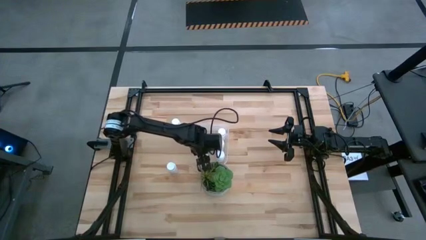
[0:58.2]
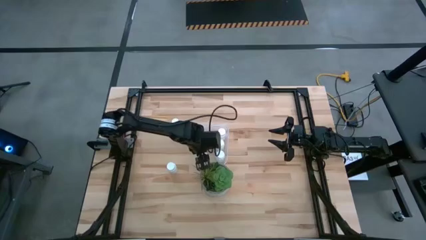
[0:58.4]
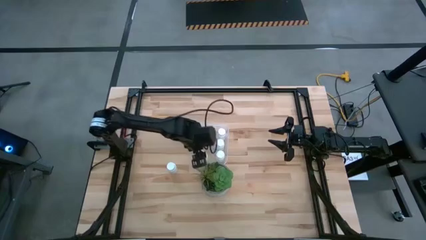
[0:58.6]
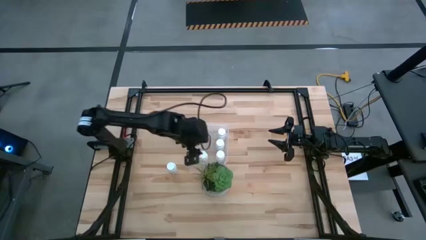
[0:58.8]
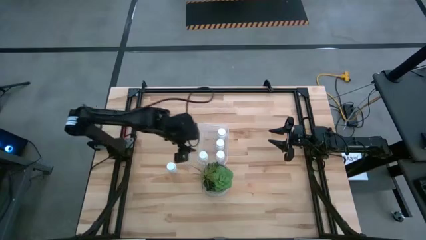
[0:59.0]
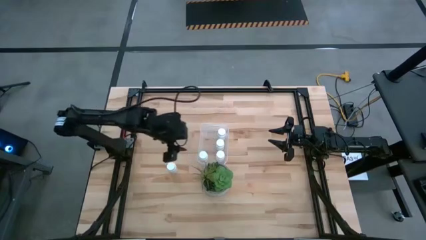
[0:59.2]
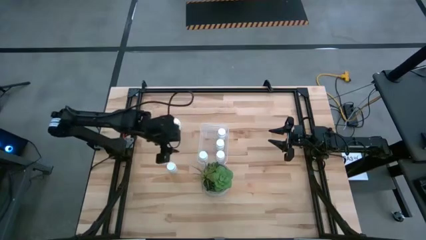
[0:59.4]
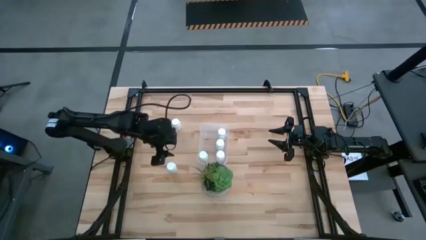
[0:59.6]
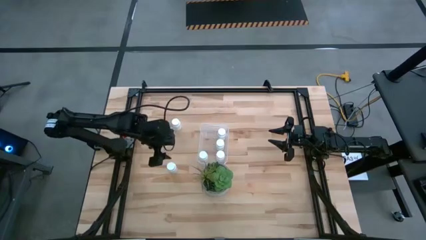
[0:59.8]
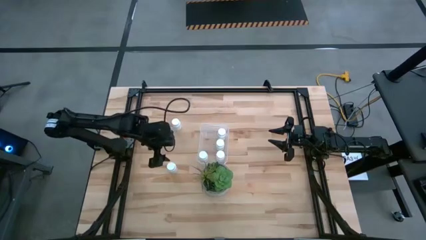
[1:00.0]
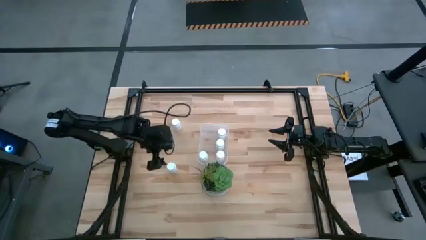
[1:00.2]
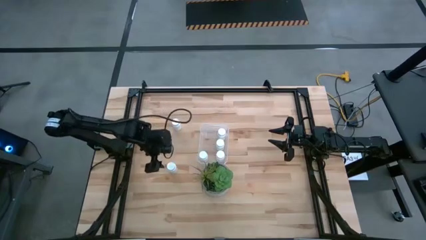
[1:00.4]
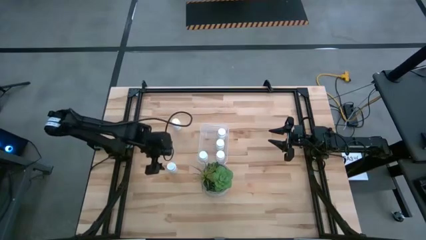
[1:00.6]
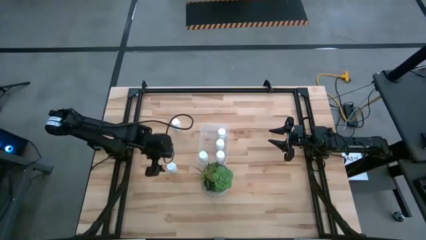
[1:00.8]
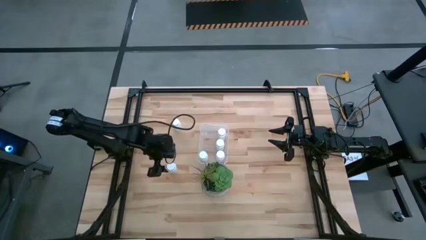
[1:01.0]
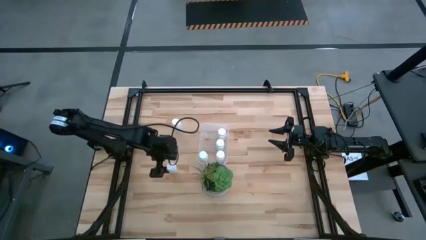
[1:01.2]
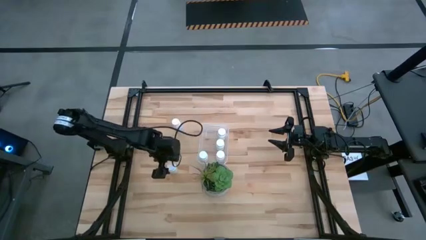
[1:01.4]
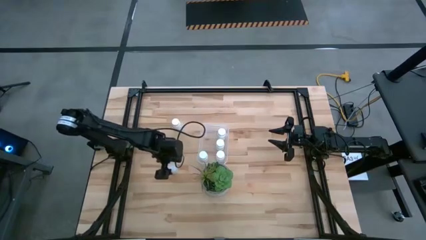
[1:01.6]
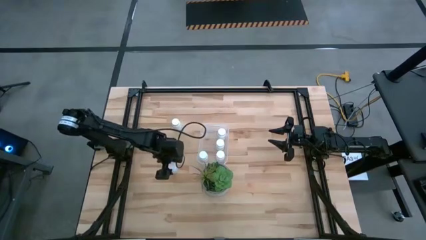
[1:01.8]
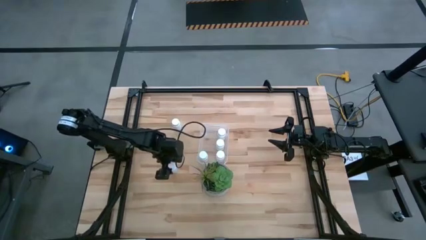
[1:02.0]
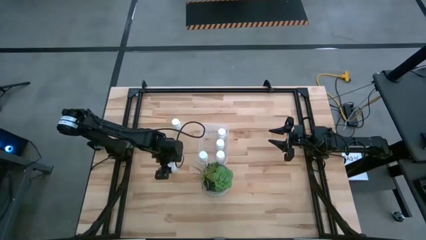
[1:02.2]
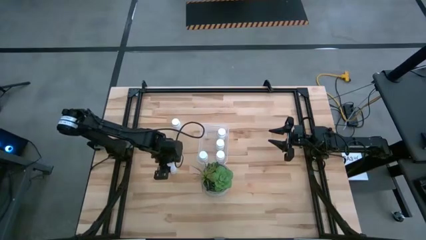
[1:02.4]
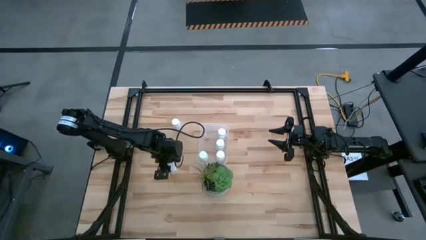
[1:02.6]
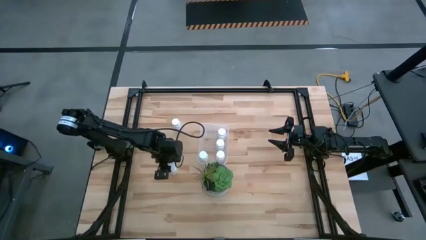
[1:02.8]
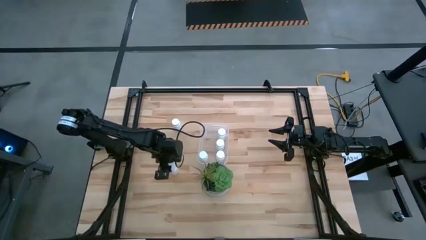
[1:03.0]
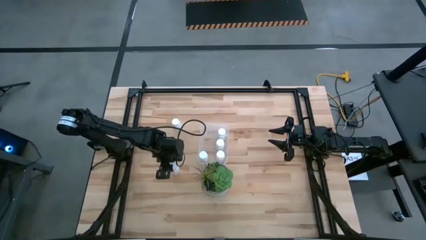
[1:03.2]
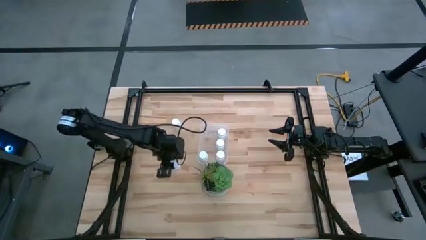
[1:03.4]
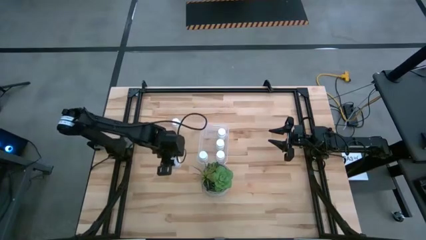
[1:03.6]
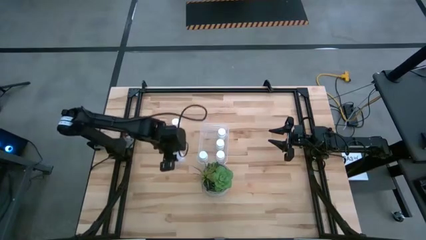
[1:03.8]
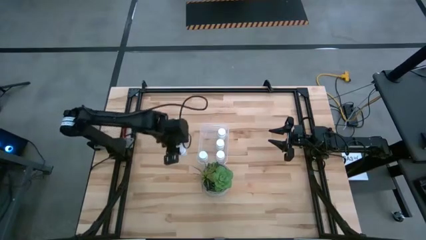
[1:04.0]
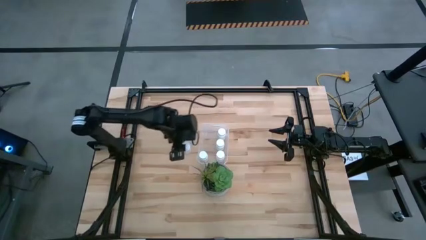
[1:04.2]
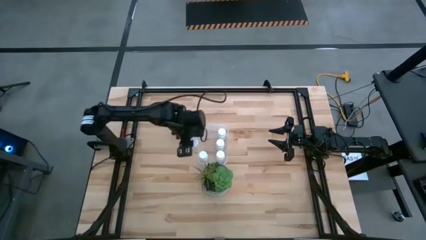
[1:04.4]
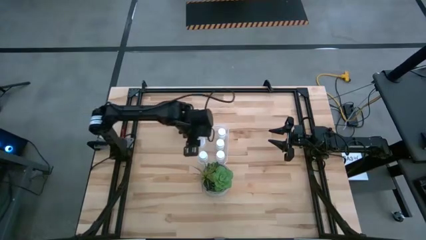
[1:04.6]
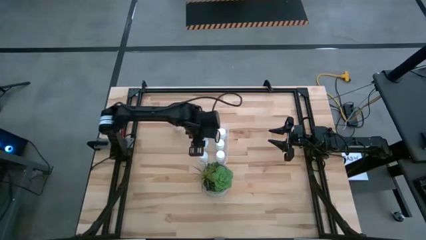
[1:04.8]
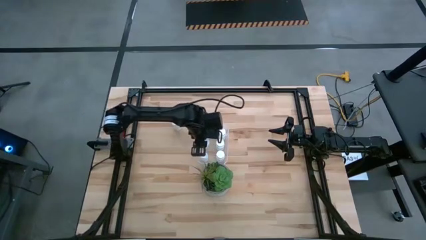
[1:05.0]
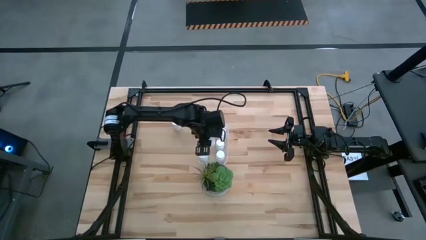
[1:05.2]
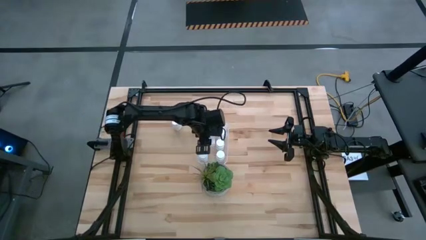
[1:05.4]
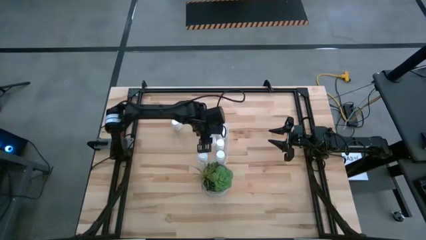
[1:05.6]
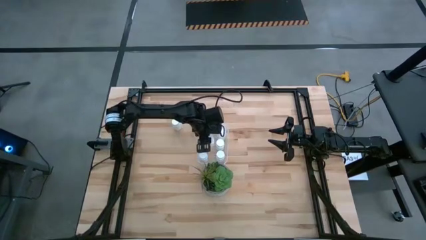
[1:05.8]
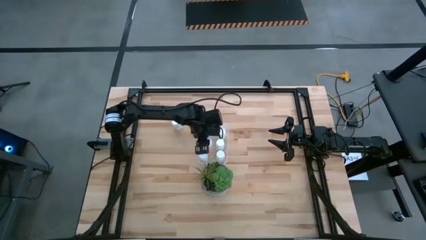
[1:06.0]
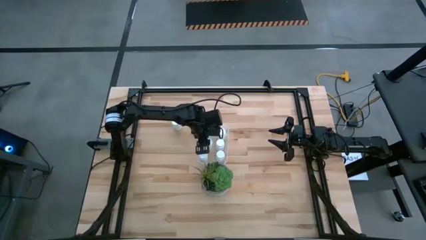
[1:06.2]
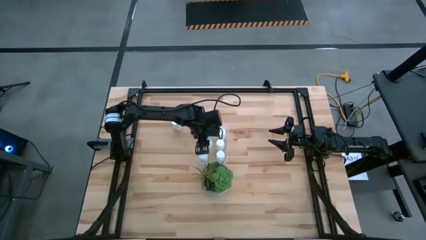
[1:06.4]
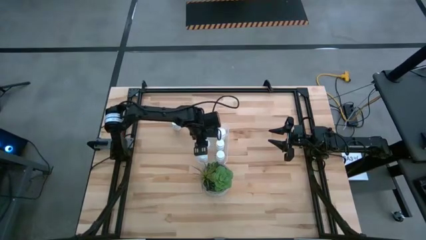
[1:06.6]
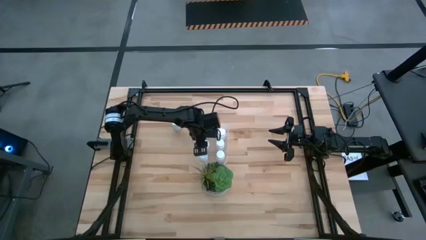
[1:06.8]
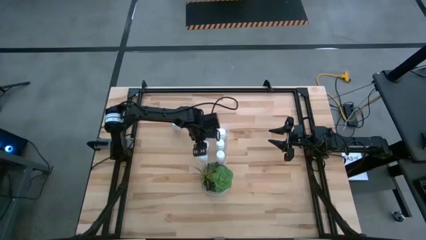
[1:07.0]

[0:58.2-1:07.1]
Task: Pick and place pill bottles into a basket
Put the white pill bottle into the transparent bin

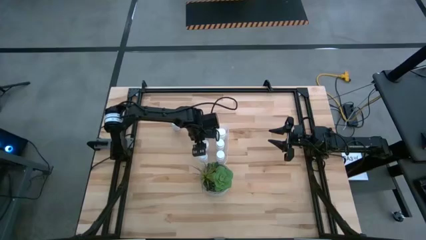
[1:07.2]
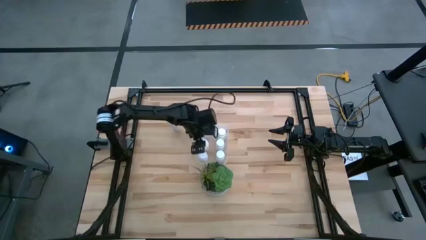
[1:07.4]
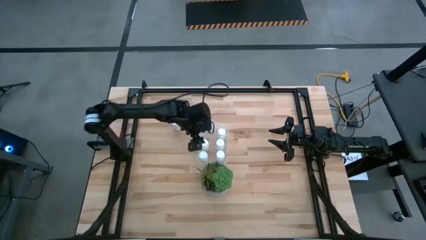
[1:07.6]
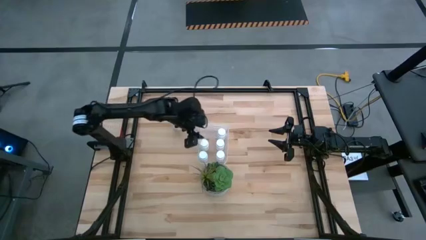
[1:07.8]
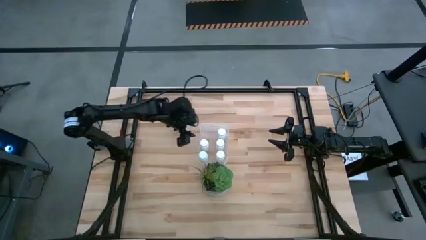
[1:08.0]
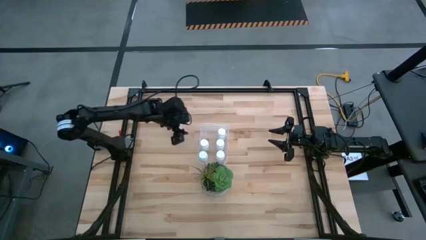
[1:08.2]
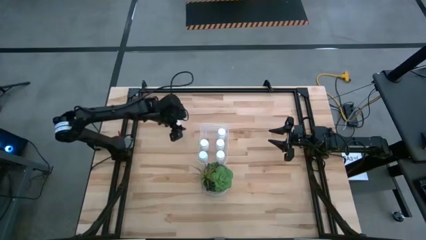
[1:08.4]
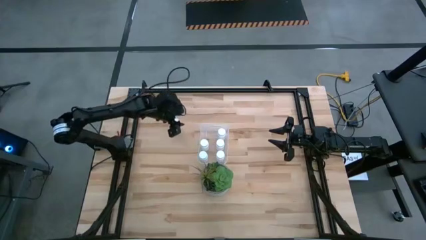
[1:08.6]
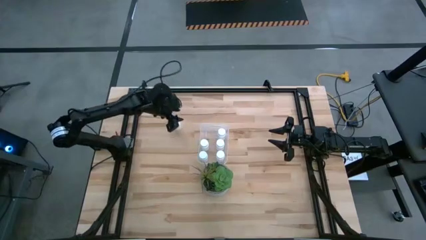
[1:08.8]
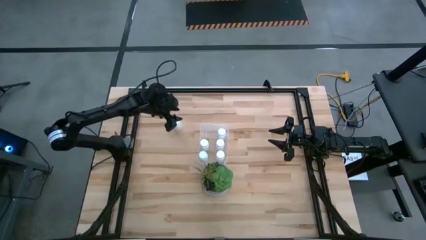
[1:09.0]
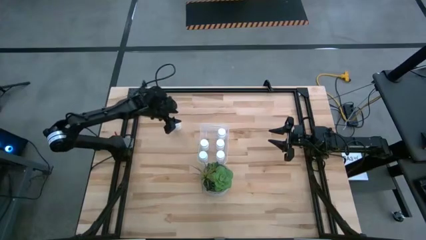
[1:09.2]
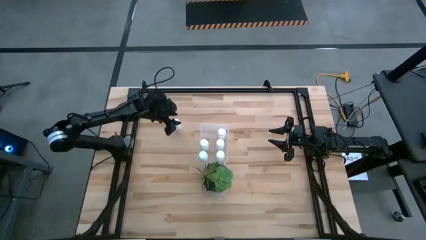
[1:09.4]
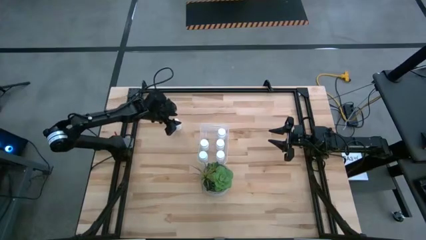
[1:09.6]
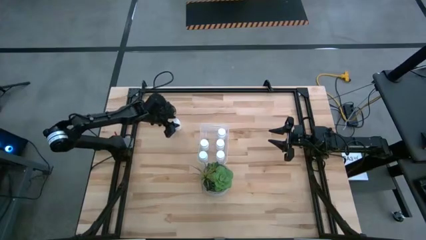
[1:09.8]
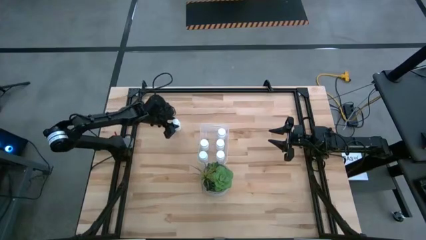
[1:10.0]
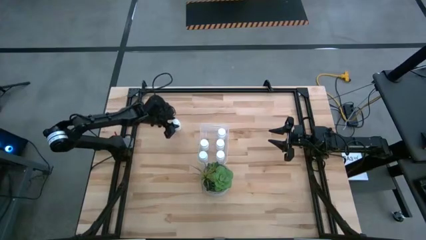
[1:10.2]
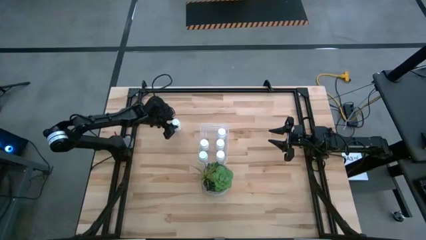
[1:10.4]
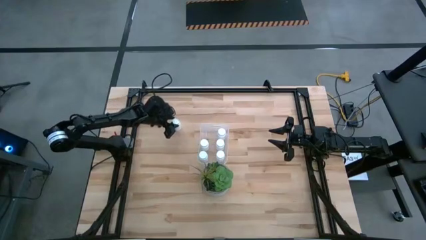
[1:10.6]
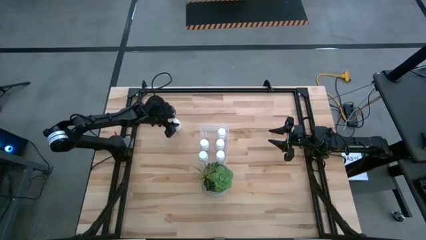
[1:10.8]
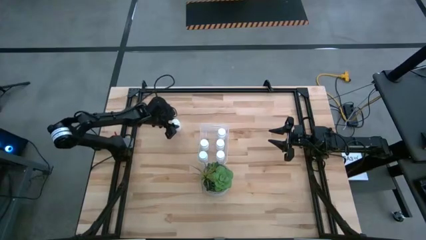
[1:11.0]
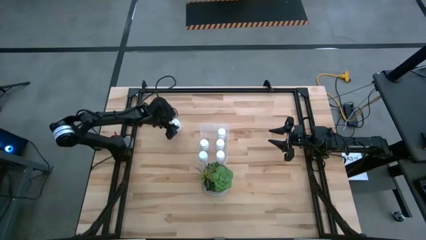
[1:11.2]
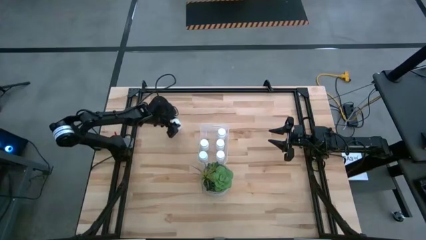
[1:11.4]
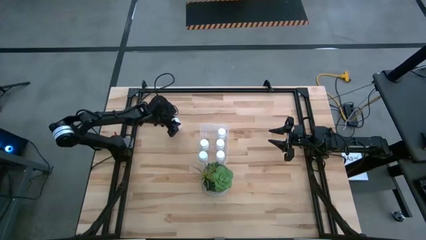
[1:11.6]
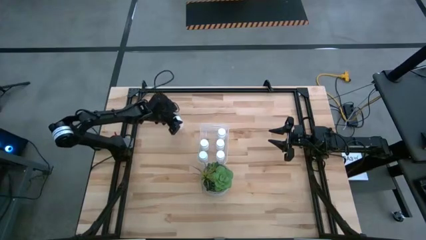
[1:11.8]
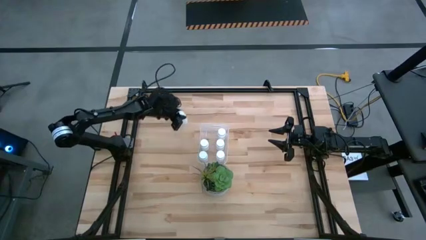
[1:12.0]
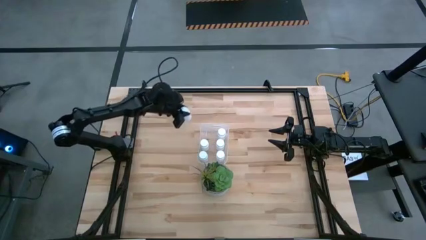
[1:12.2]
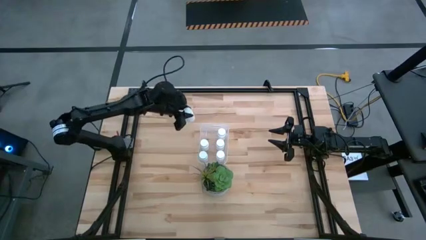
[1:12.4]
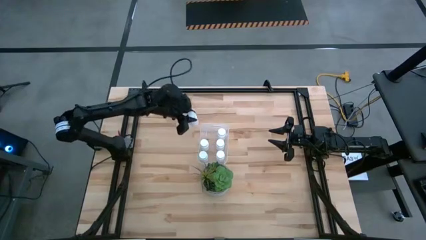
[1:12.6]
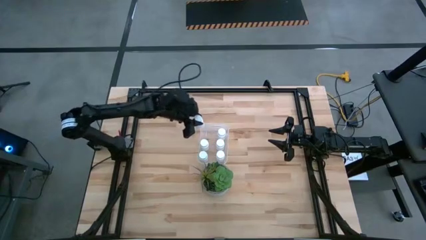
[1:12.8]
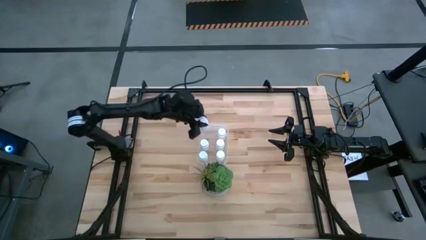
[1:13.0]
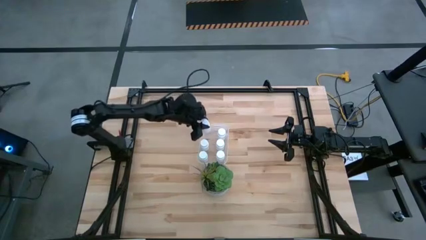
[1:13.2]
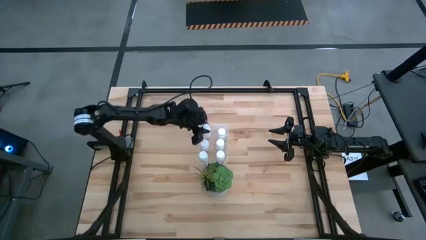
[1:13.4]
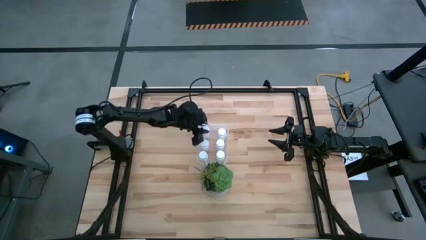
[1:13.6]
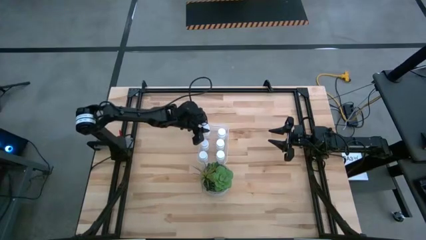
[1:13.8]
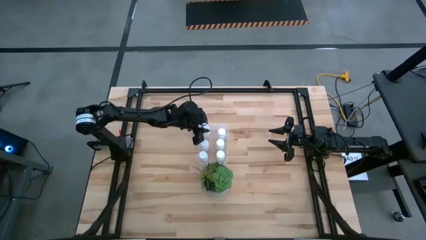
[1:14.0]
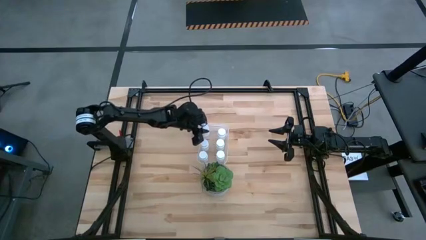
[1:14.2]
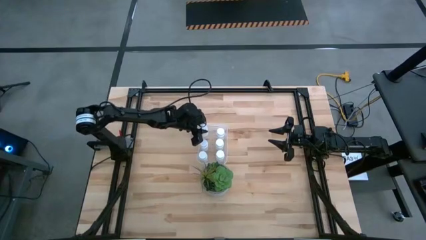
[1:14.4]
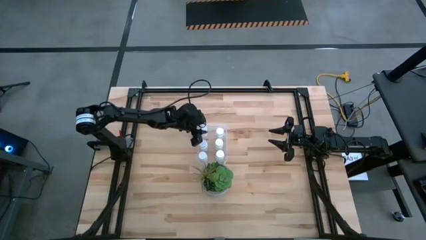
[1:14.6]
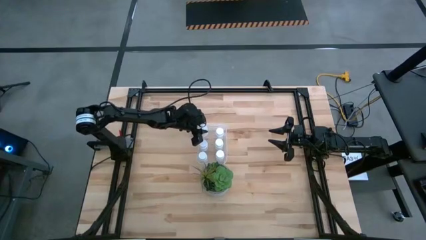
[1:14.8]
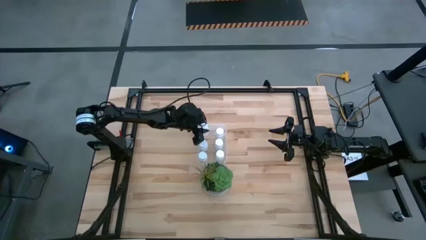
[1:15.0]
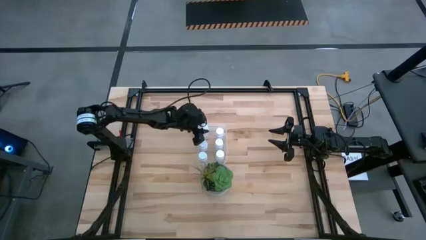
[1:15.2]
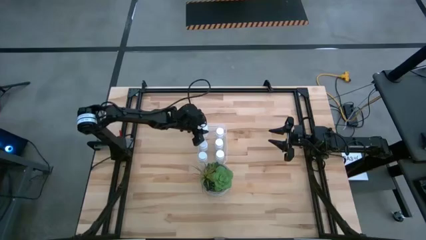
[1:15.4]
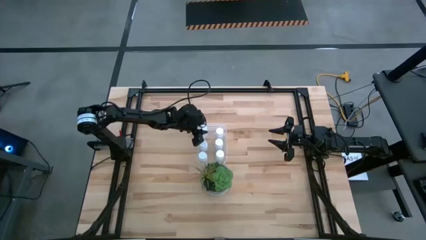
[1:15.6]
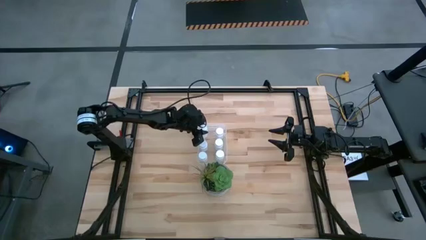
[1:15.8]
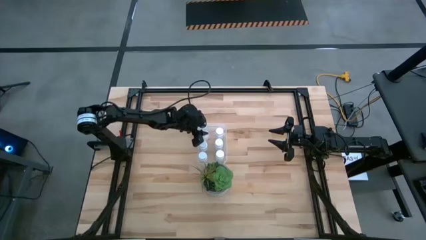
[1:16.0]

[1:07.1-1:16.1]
Put the white pill bottle into the transparent bin
